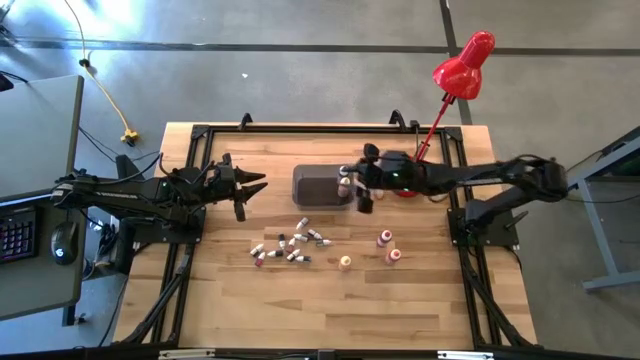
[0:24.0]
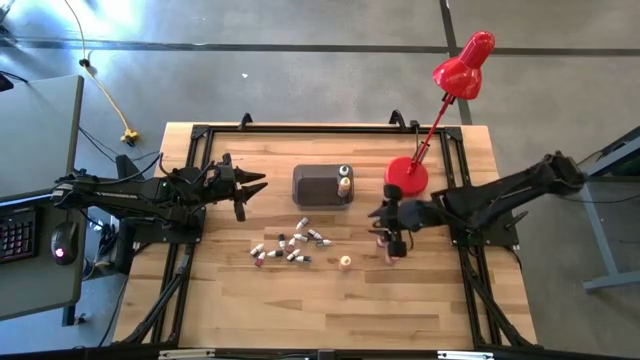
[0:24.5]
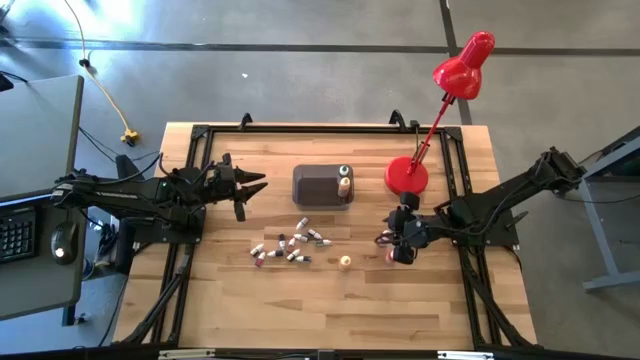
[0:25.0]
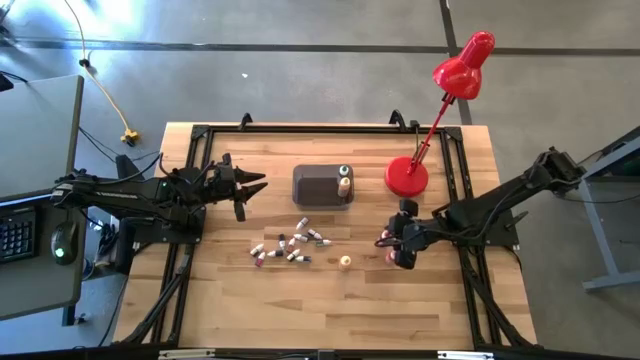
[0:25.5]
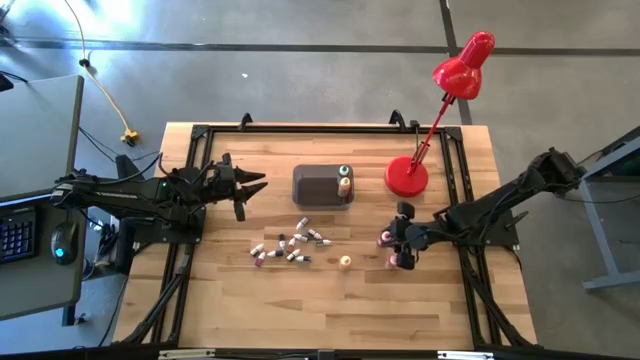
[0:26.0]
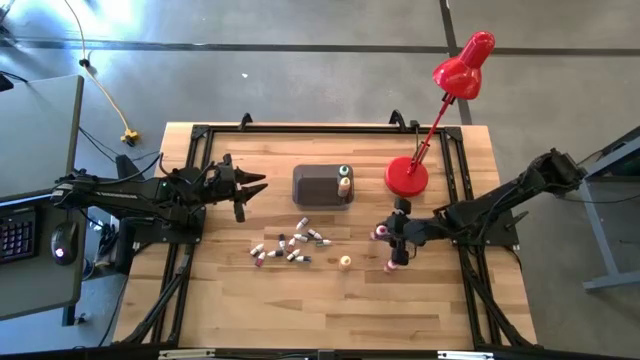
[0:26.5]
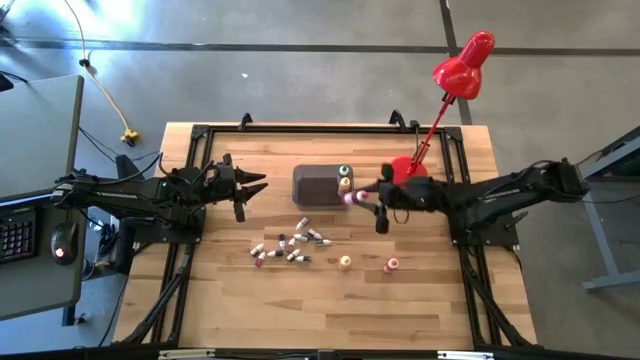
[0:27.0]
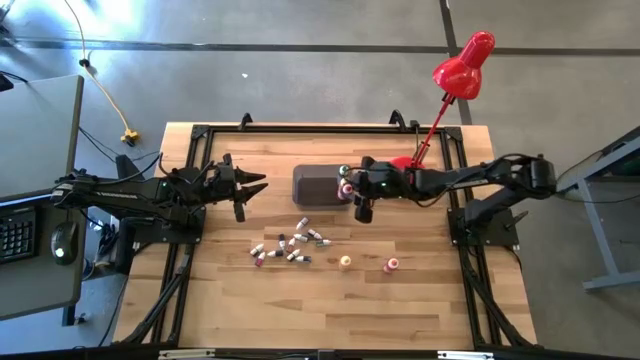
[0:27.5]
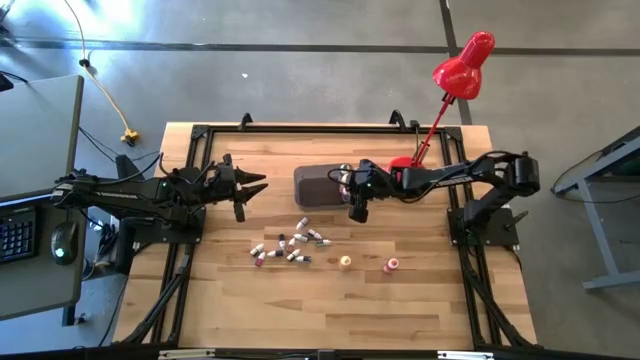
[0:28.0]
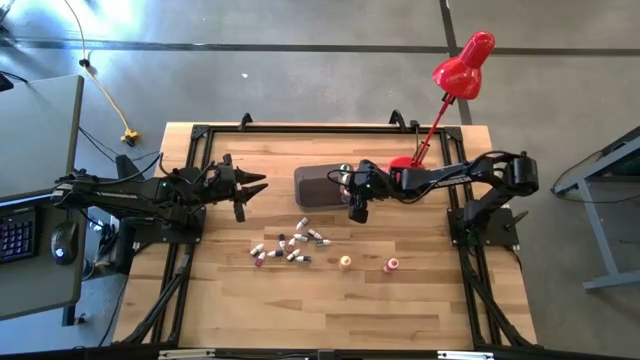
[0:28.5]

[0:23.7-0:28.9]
Task: Pick & Place food coloring
Put the big red food coloring bottle into the black bin

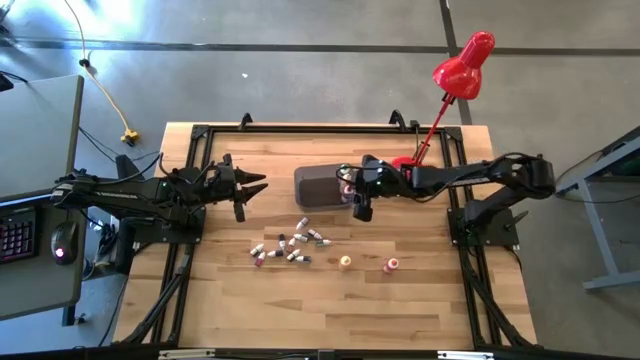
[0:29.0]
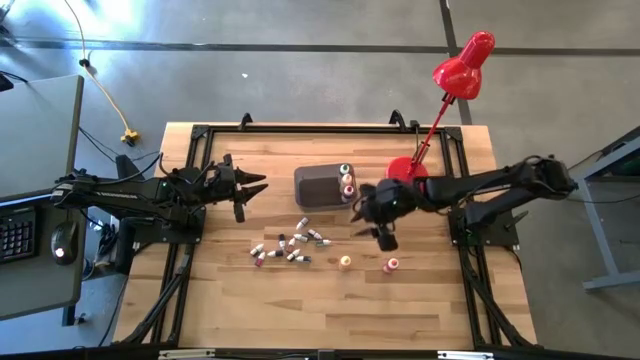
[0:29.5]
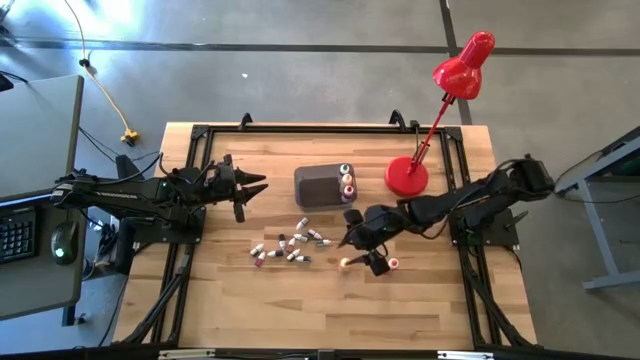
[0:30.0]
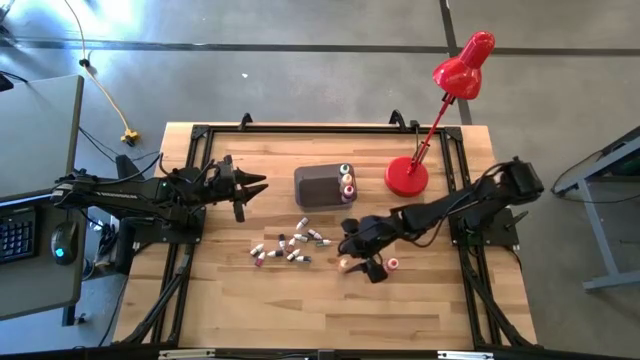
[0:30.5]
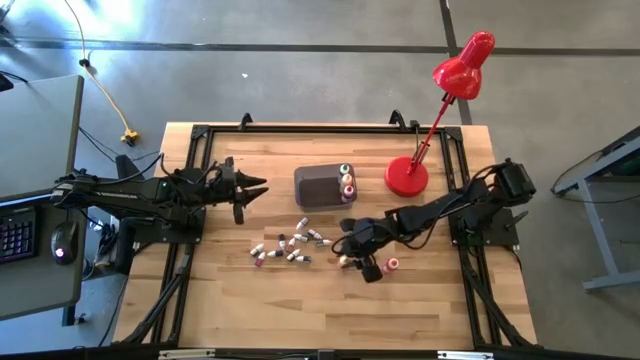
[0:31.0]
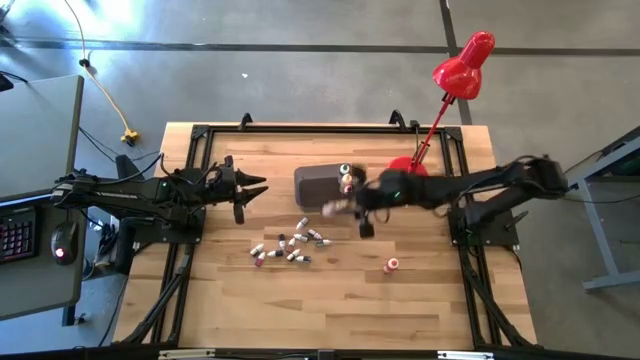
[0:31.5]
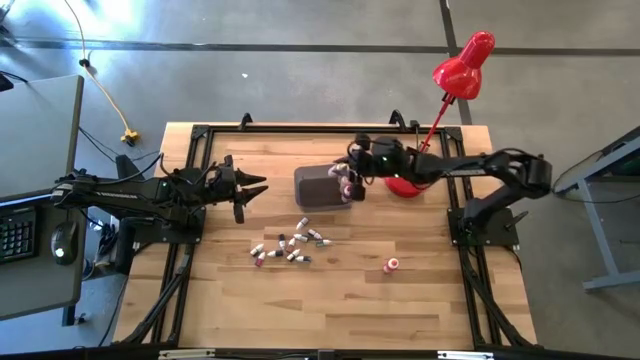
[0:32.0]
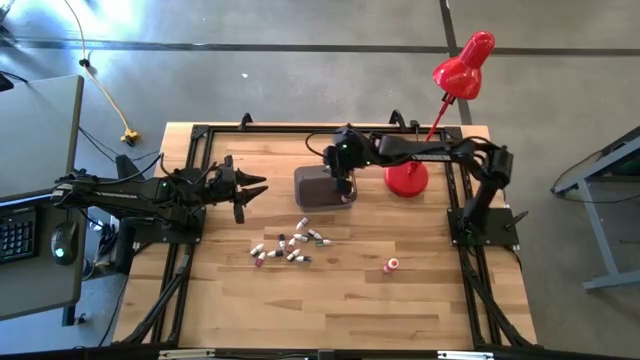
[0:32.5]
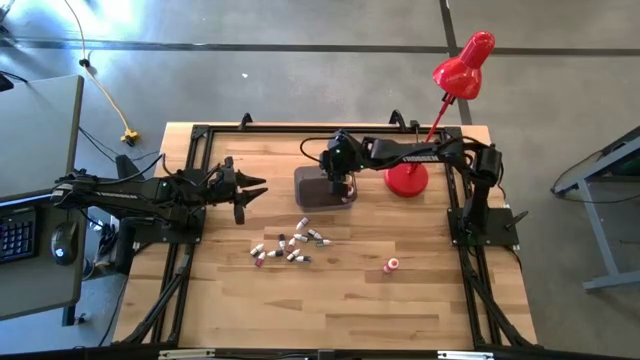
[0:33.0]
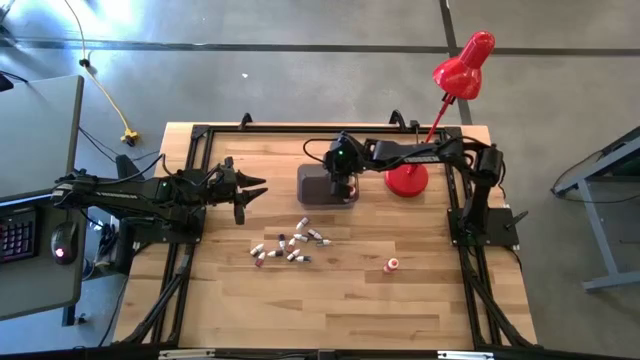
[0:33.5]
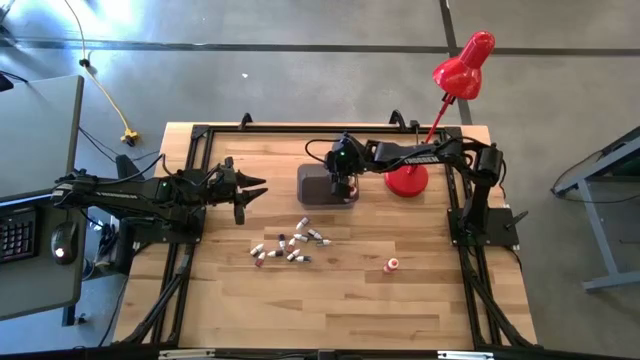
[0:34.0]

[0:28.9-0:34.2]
Put the big yellow food coloring bottle into the black bin

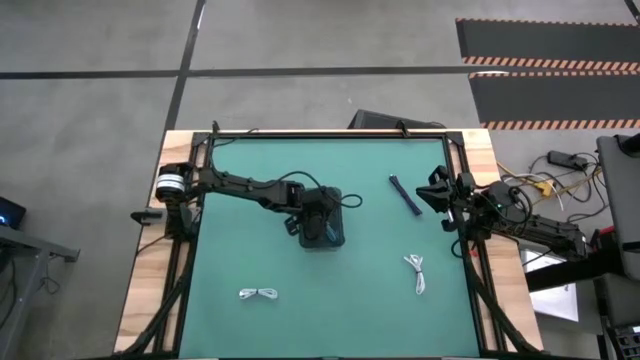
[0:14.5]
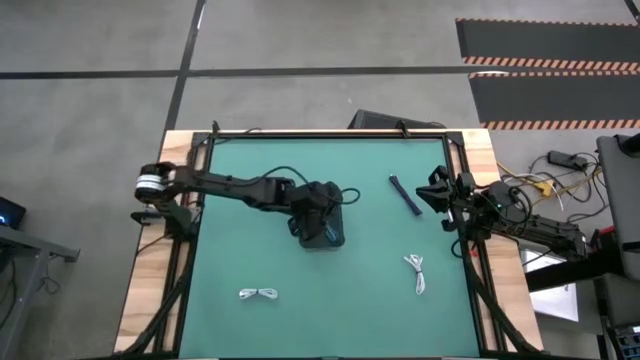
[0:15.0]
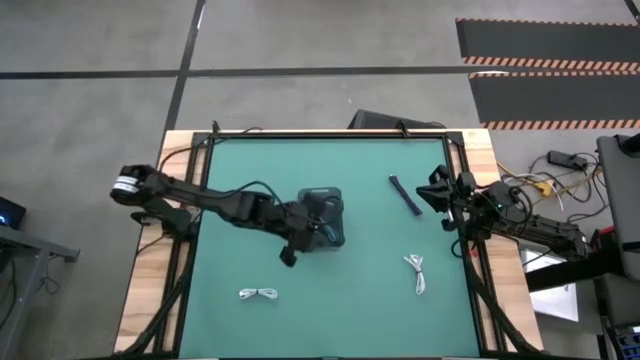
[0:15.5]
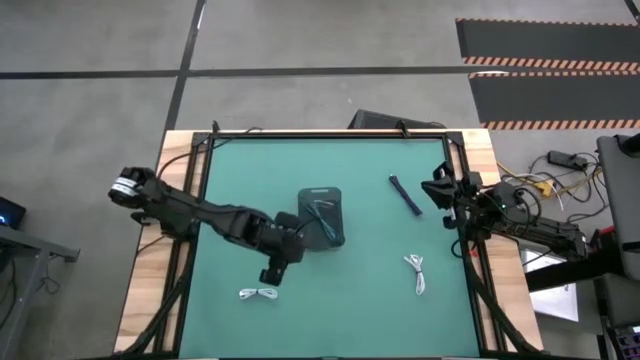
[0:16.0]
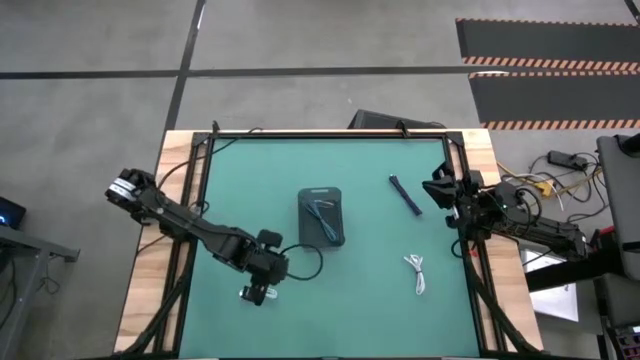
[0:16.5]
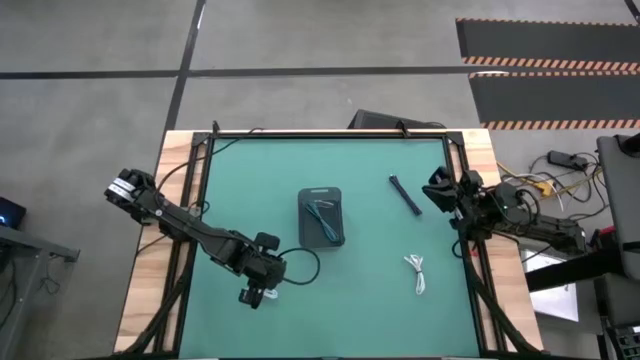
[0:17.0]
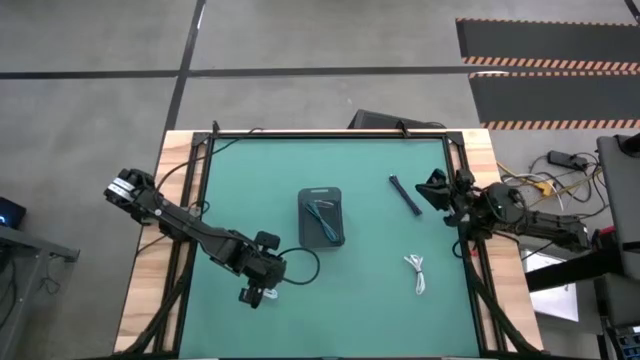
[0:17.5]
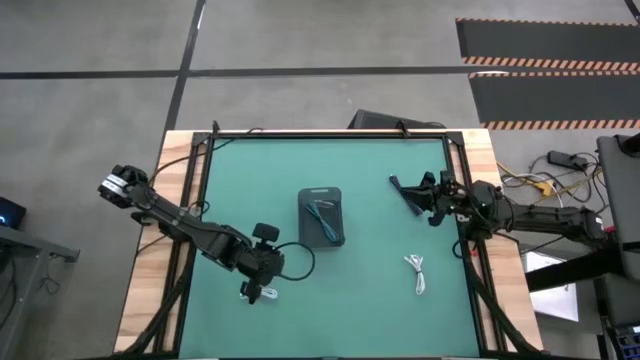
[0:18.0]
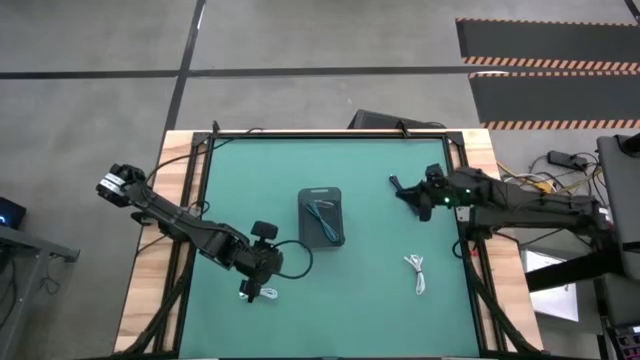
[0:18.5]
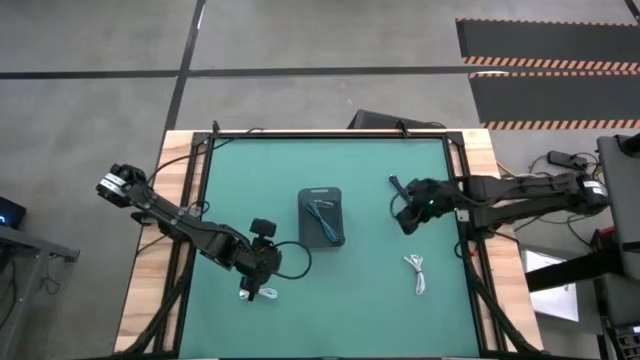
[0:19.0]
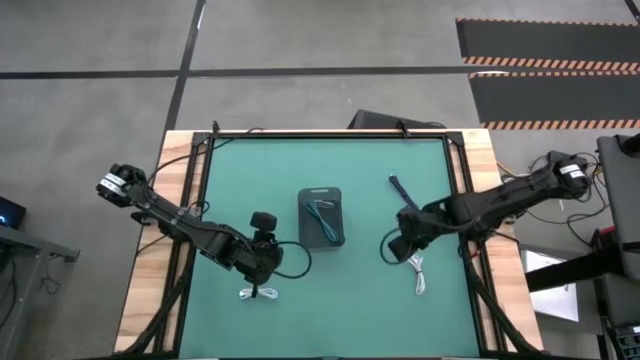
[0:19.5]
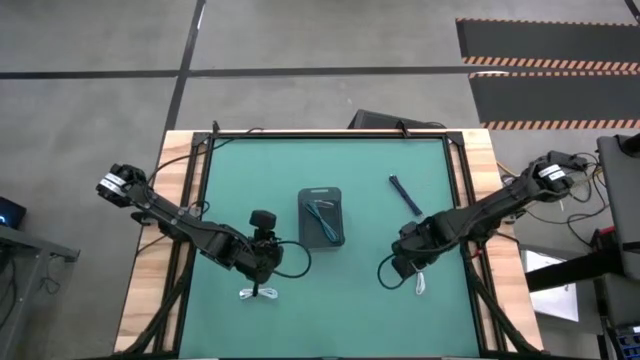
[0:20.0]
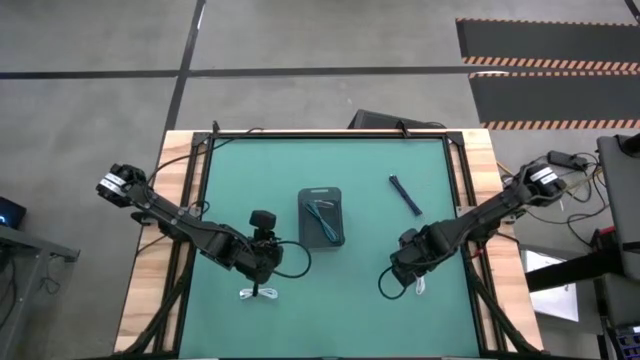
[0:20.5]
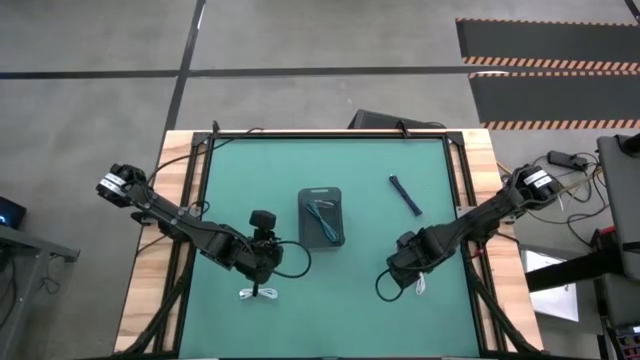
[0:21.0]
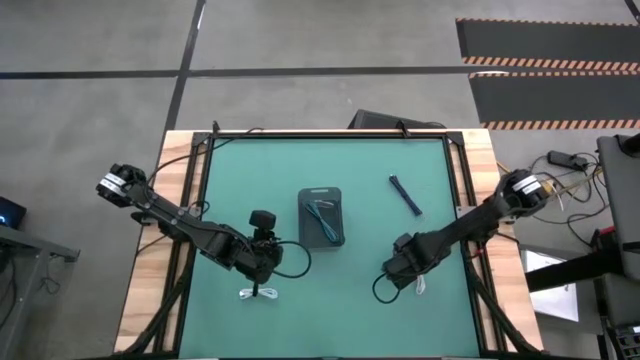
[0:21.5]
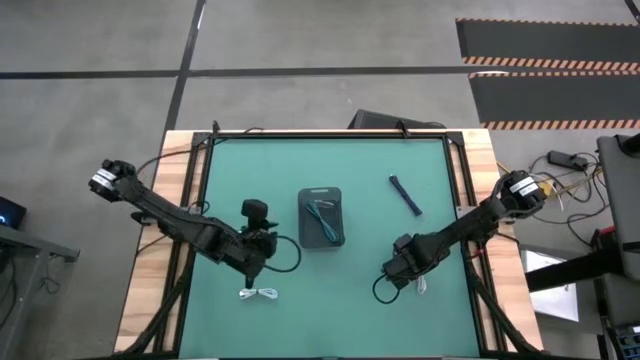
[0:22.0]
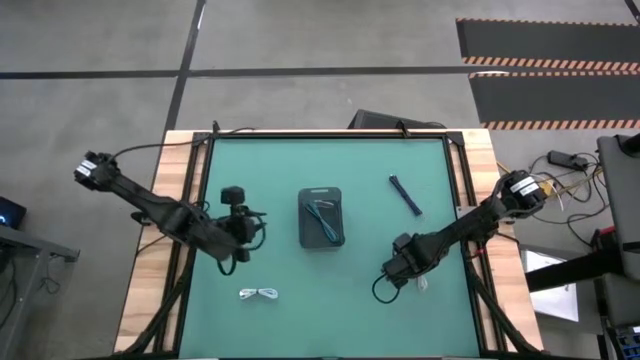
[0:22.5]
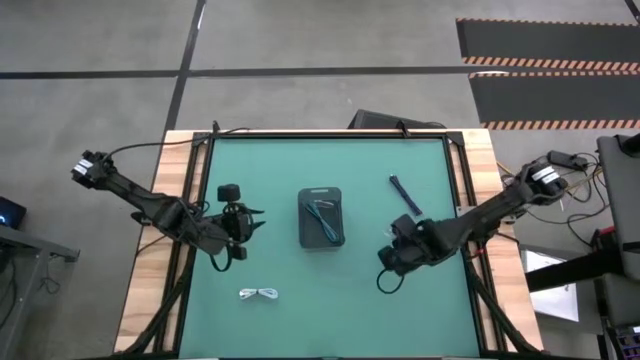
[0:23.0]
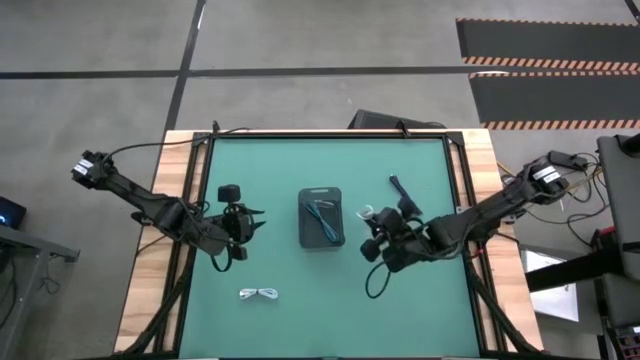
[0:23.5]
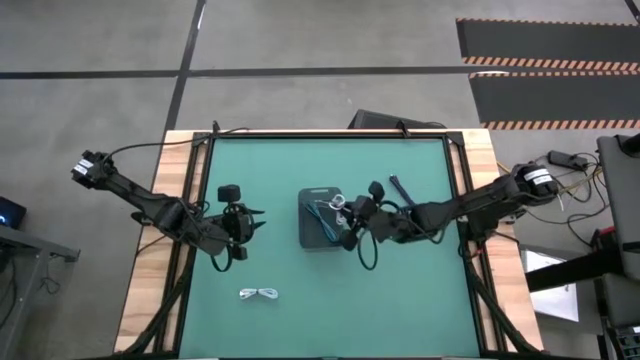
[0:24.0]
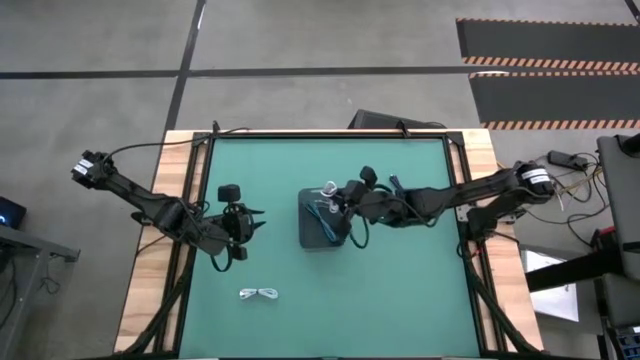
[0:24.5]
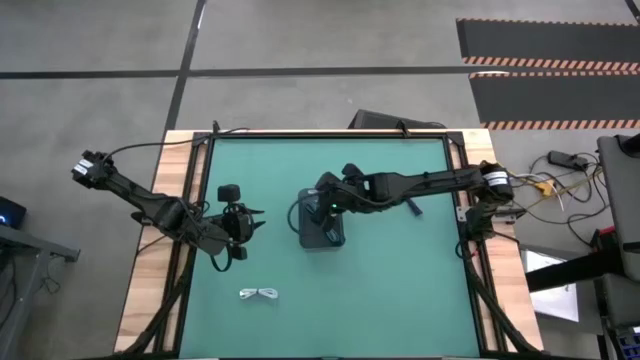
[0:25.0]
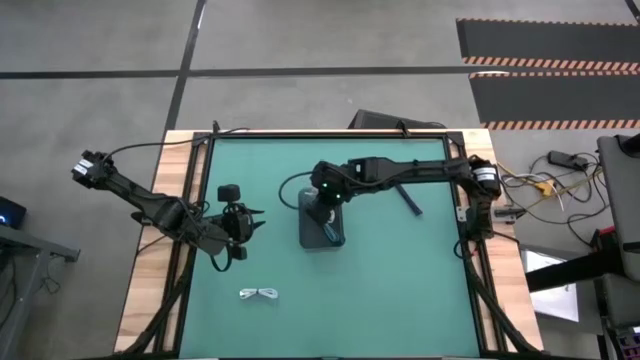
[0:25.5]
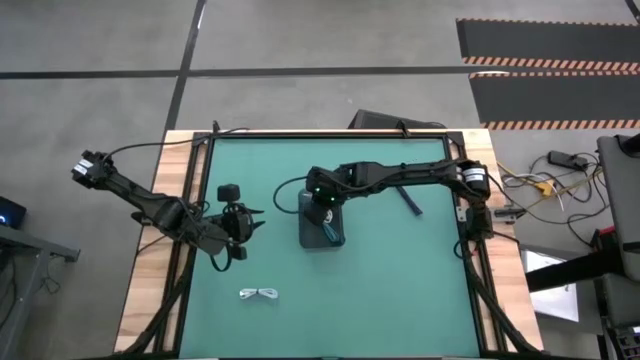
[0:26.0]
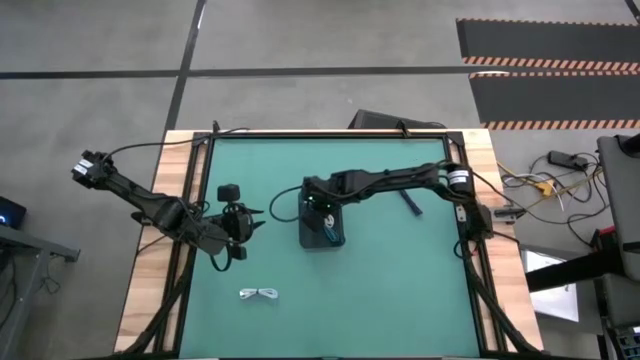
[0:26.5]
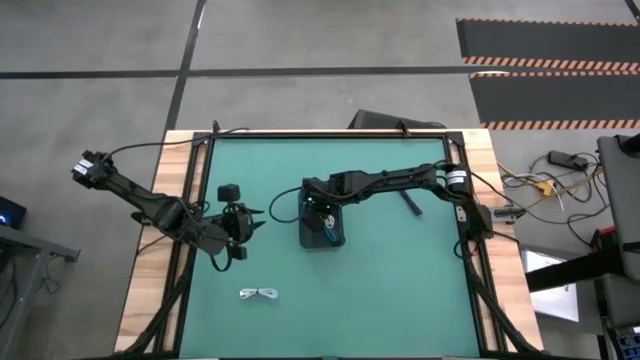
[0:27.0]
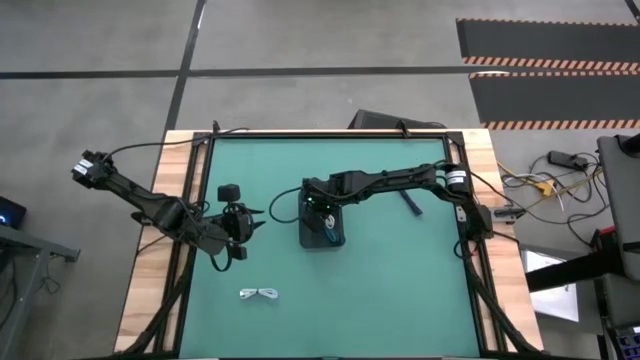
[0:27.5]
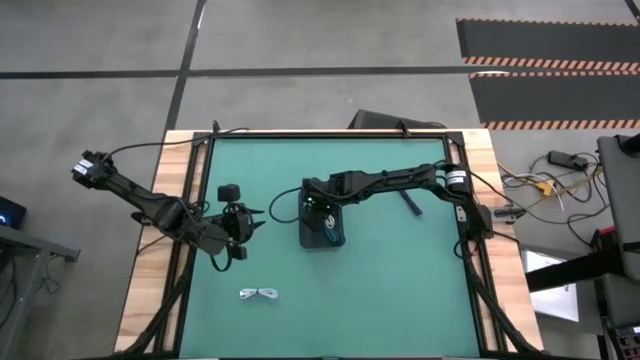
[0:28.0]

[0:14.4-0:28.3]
Task: Pick and place USB-C Cables
Put the right white charger cable into the black bin
